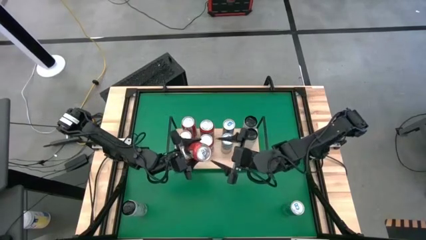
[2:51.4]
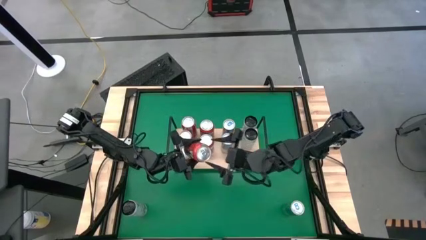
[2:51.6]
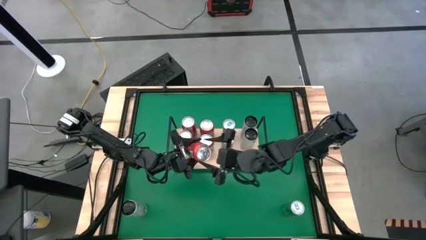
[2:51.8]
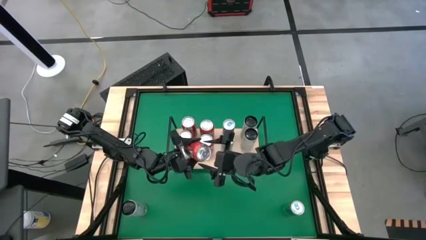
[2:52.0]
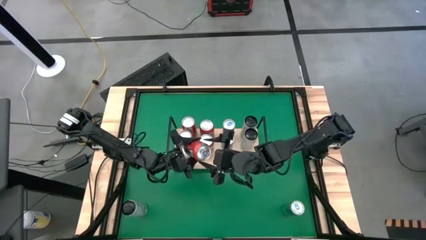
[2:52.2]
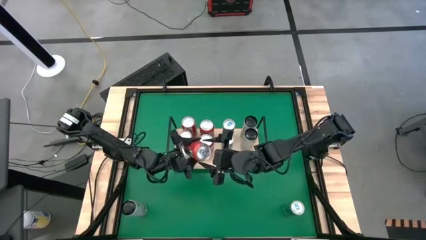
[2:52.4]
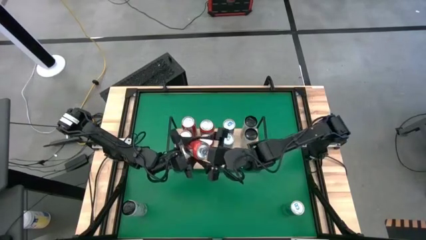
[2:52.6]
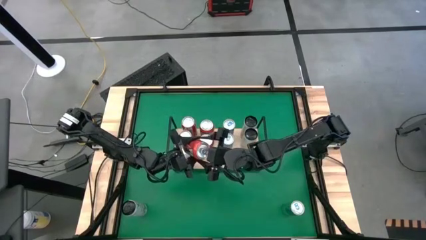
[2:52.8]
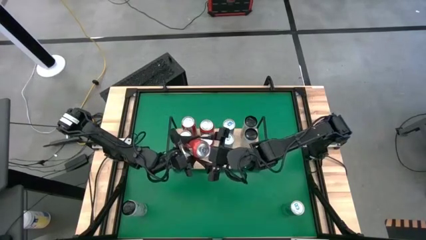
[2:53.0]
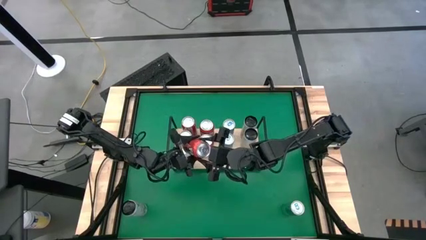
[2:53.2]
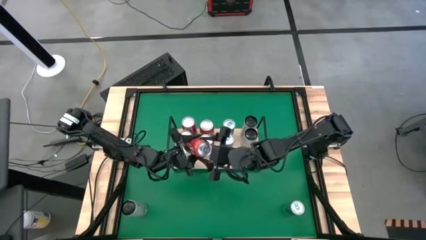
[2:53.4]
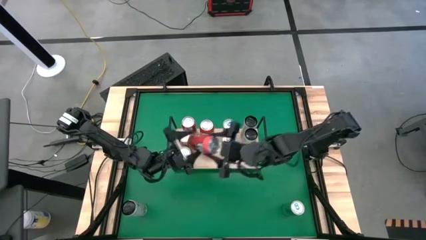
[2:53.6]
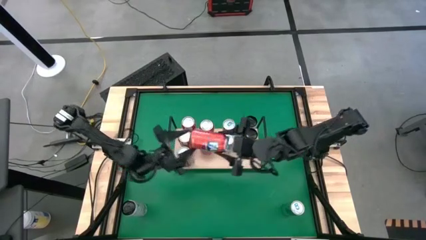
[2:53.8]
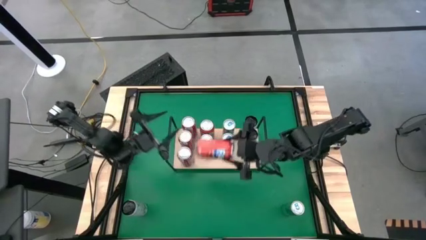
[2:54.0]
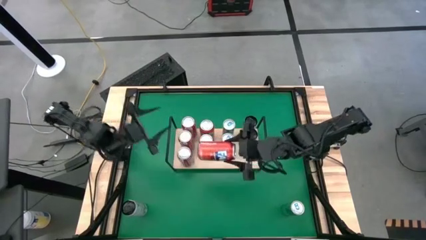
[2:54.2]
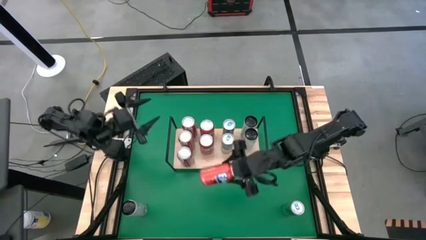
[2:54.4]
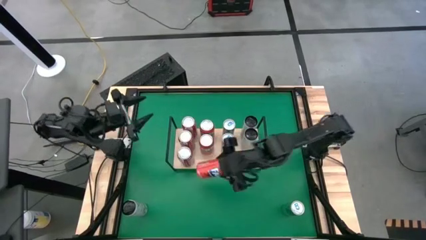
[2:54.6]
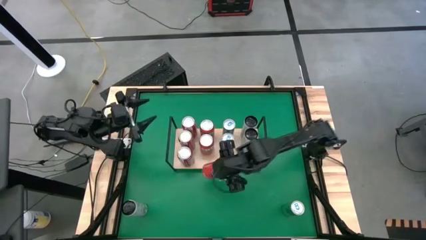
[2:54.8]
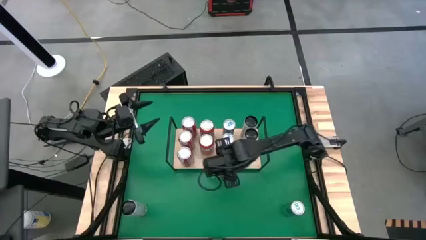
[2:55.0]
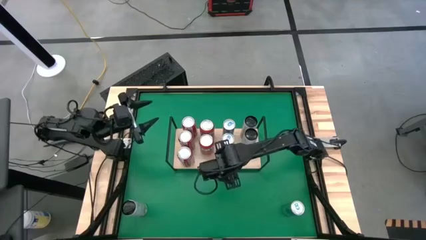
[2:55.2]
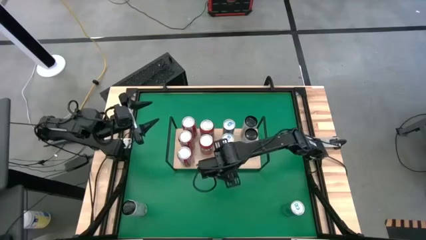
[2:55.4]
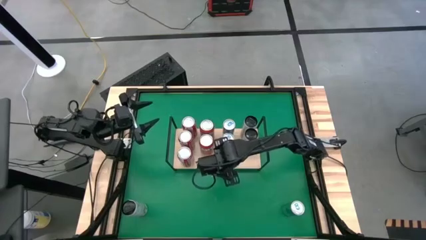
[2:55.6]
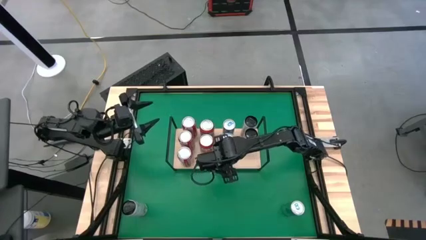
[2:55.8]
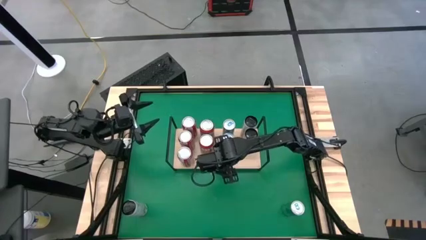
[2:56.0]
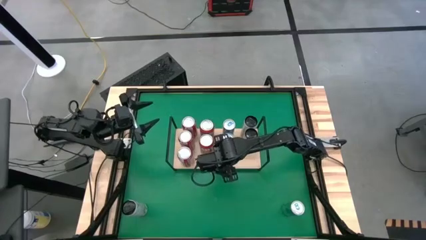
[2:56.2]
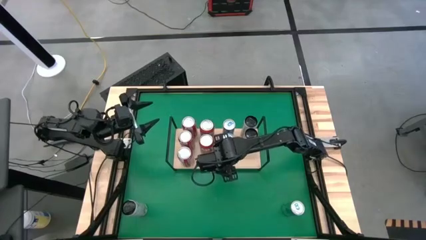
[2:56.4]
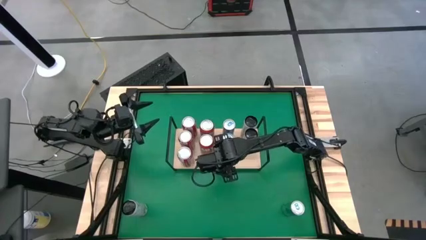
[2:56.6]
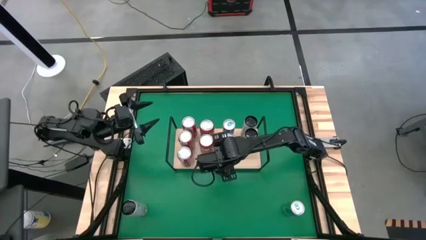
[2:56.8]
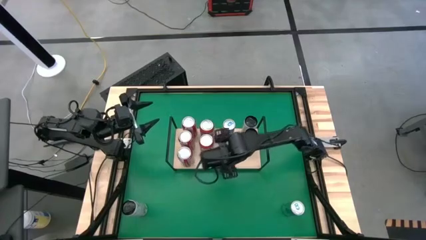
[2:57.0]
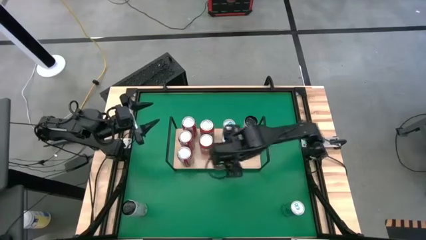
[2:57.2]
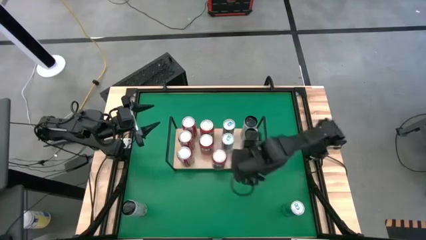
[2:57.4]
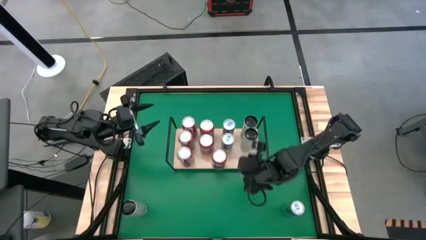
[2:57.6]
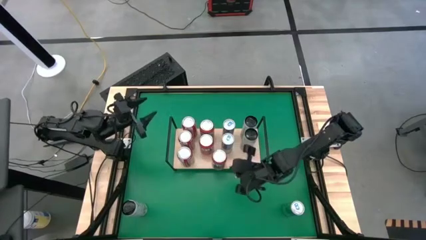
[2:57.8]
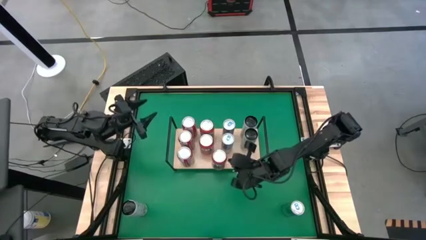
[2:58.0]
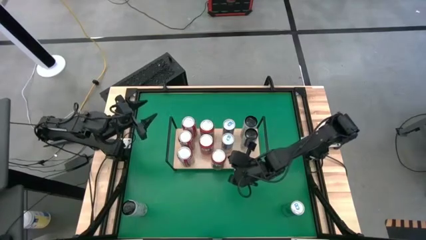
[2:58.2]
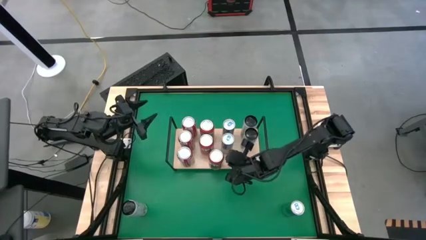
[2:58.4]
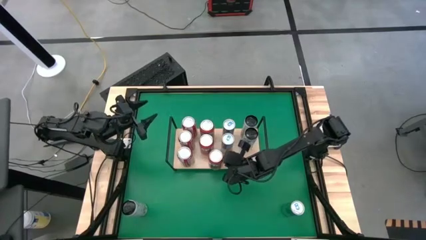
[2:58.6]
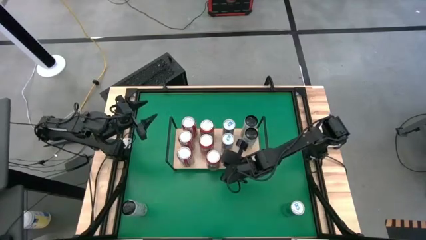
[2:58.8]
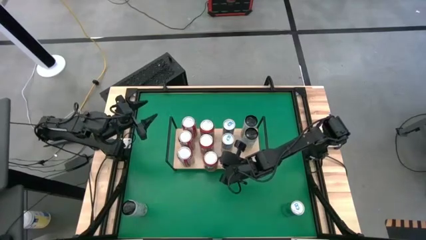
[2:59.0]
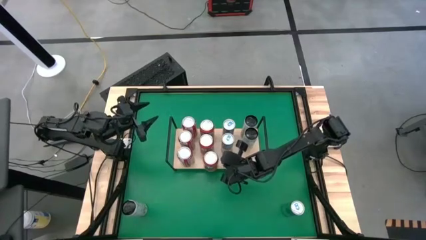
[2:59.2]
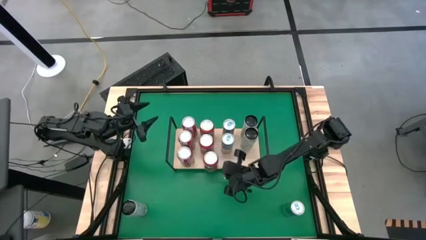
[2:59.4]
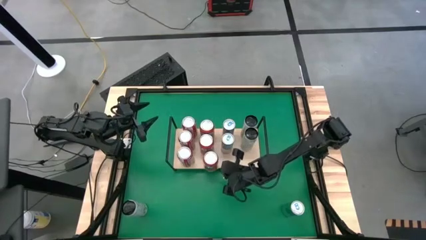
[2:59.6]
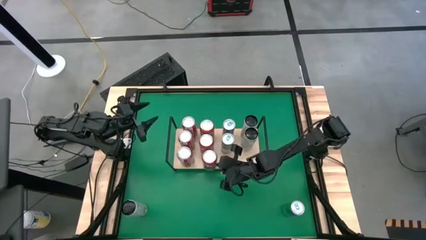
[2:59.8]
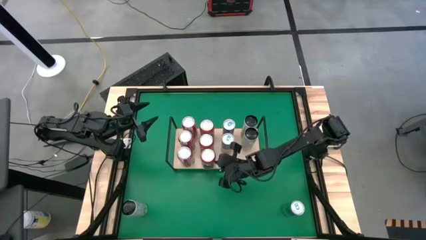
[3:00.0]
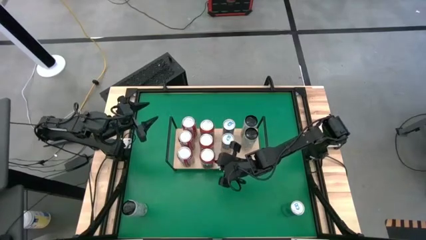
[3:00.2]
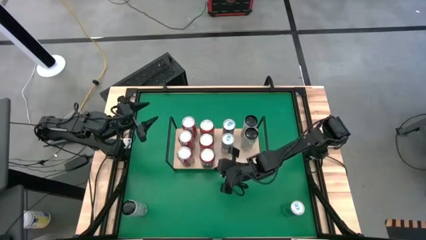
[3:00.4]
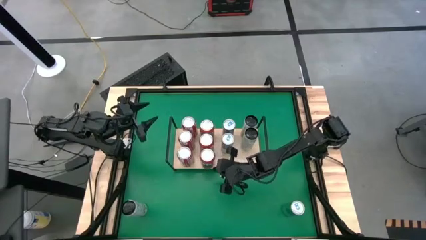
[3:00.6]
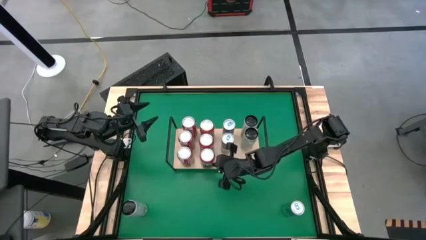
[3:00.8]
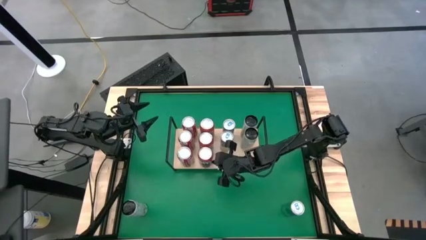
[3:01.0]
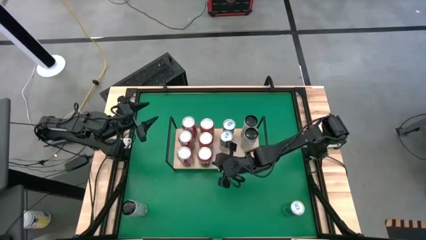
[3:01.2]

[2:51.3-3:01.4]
Task: Place canned beverage on shelf
Put the orange soda can on the shelf aligned with the other orange soda cans
